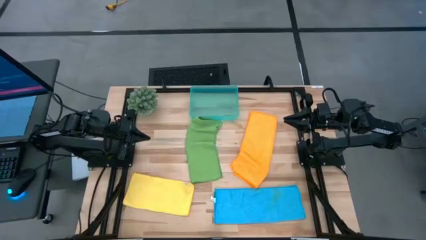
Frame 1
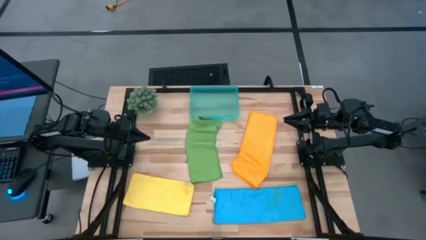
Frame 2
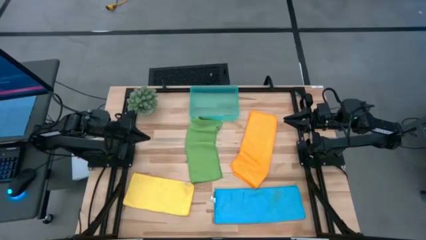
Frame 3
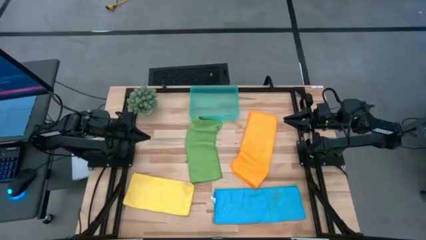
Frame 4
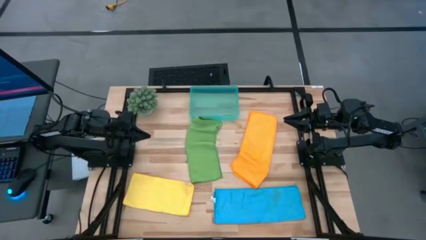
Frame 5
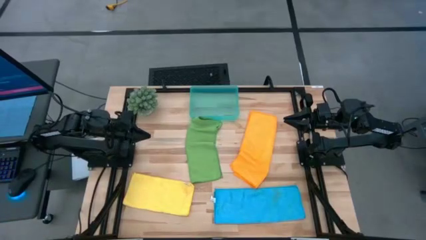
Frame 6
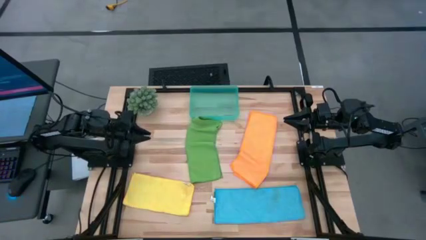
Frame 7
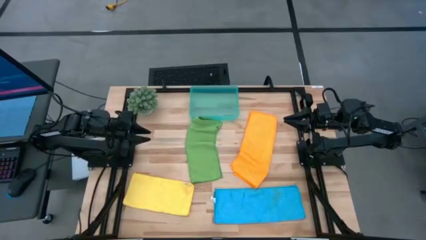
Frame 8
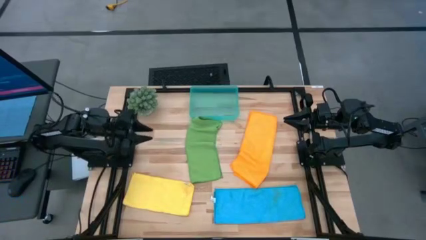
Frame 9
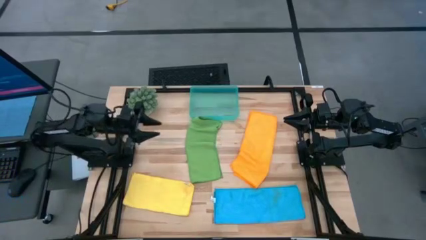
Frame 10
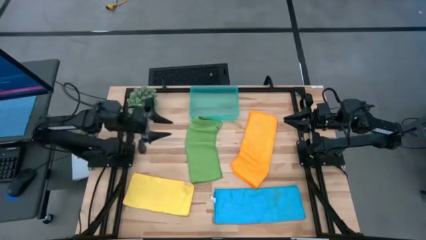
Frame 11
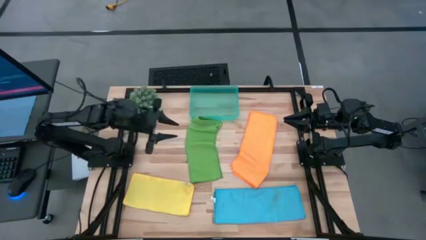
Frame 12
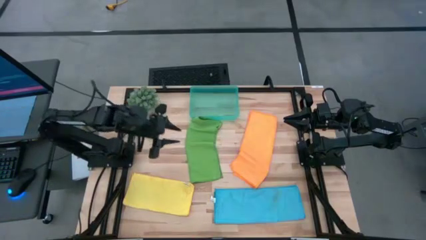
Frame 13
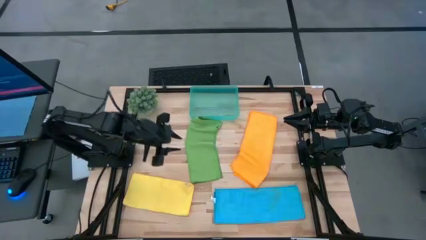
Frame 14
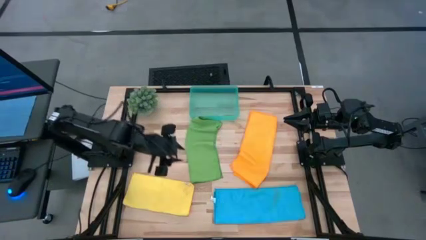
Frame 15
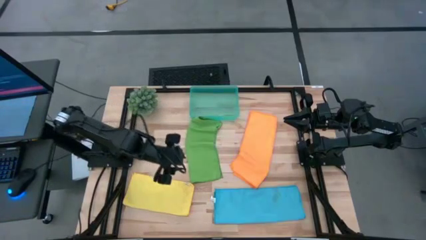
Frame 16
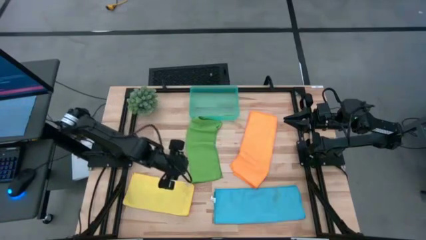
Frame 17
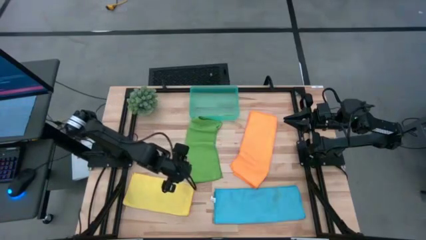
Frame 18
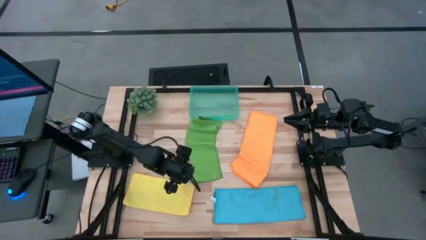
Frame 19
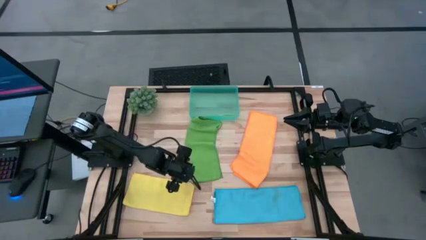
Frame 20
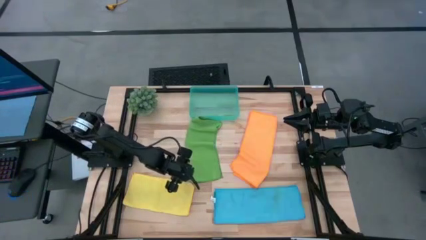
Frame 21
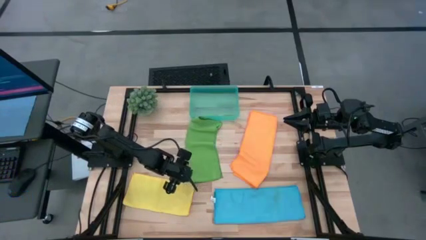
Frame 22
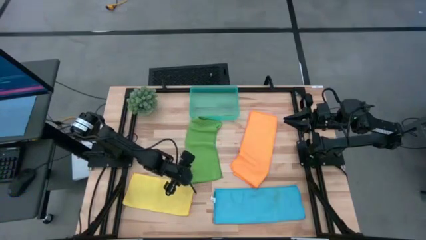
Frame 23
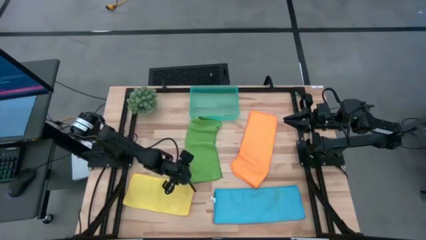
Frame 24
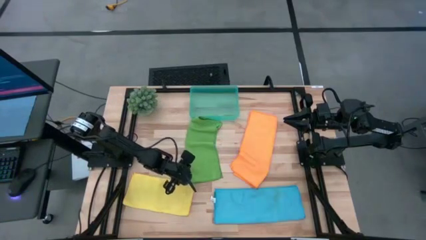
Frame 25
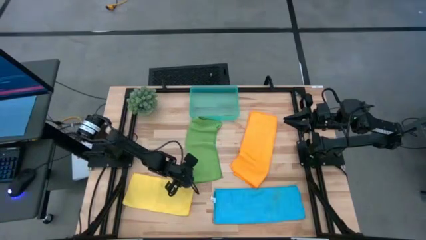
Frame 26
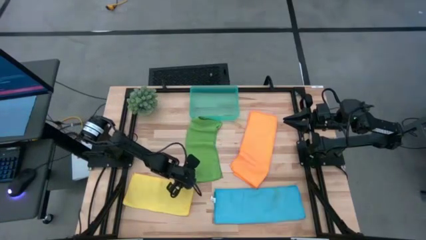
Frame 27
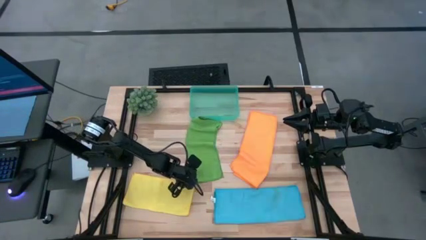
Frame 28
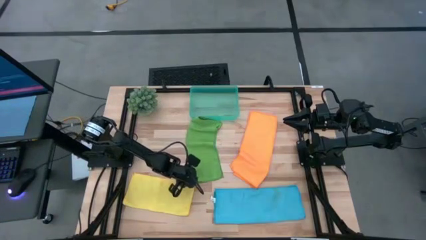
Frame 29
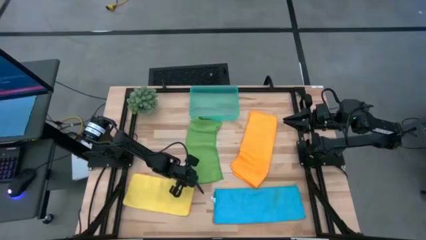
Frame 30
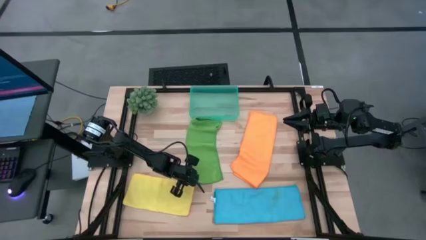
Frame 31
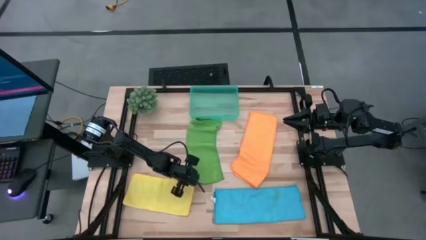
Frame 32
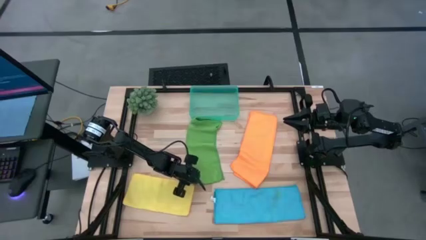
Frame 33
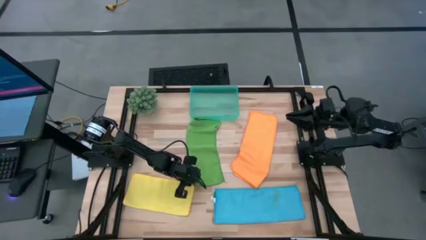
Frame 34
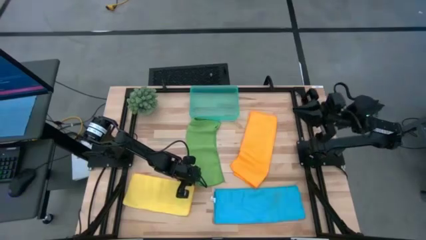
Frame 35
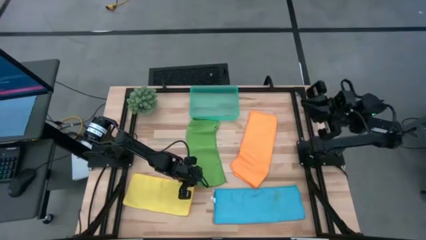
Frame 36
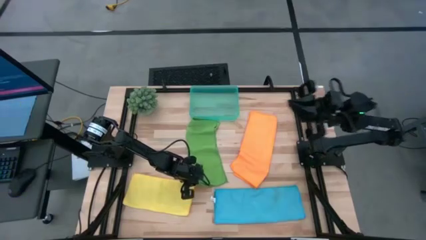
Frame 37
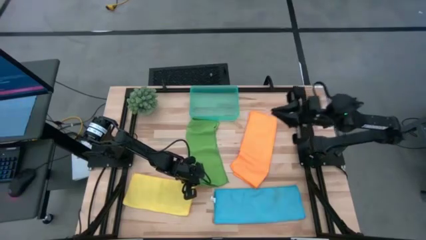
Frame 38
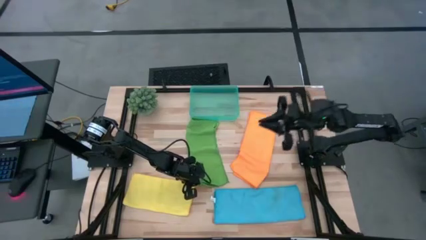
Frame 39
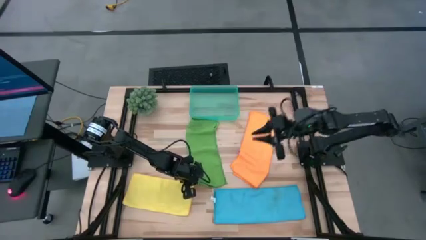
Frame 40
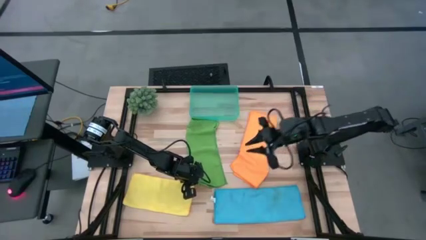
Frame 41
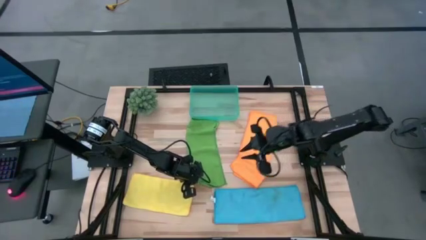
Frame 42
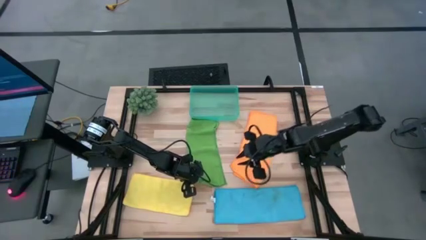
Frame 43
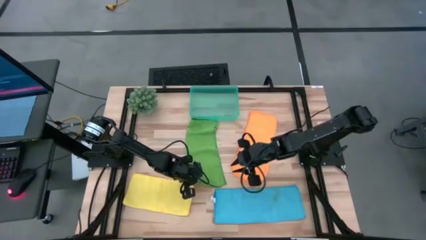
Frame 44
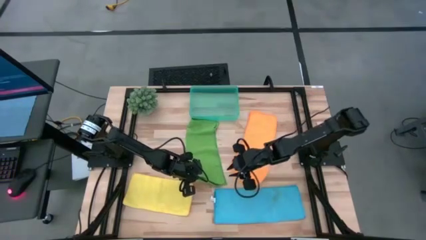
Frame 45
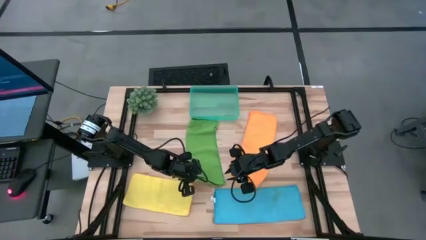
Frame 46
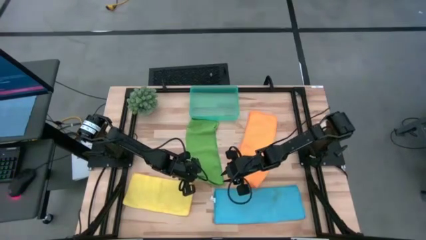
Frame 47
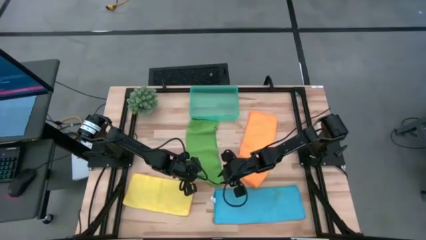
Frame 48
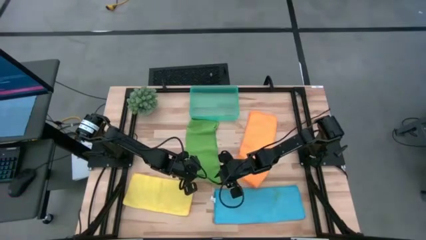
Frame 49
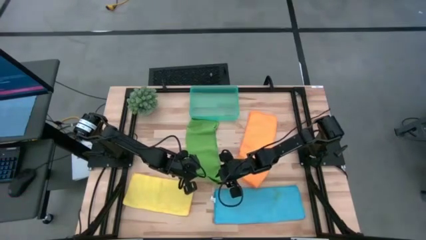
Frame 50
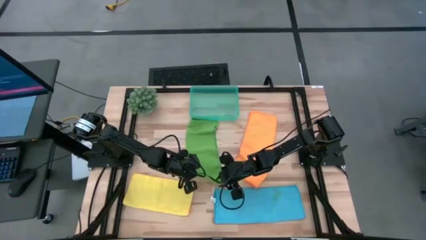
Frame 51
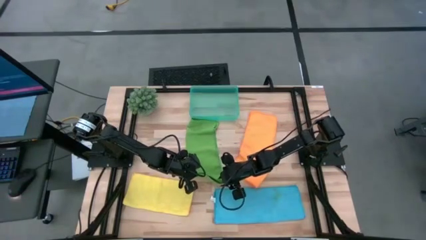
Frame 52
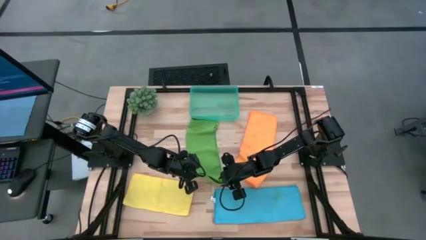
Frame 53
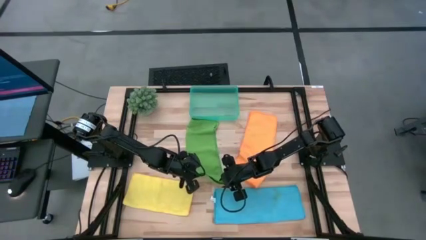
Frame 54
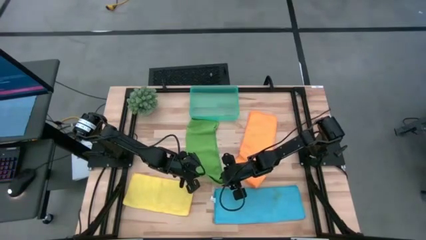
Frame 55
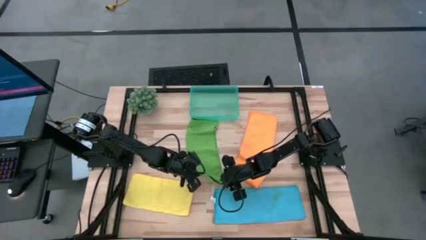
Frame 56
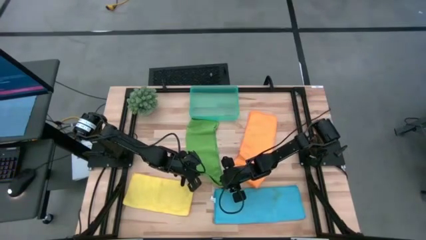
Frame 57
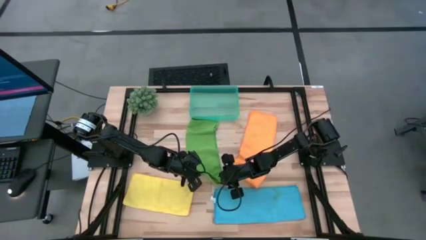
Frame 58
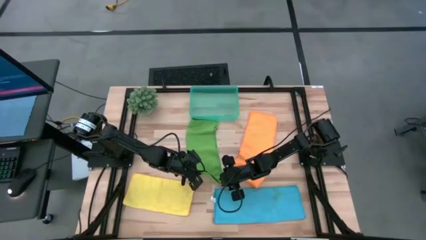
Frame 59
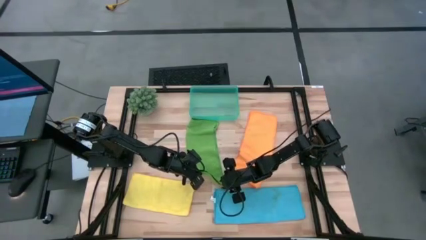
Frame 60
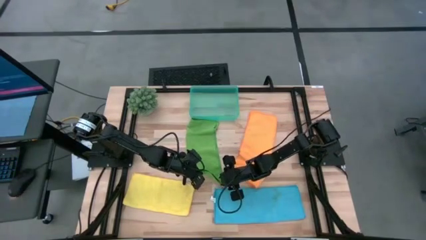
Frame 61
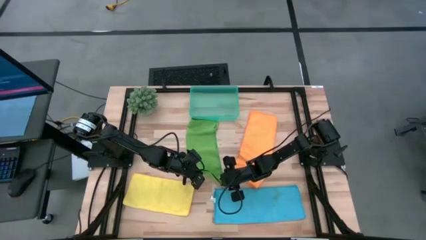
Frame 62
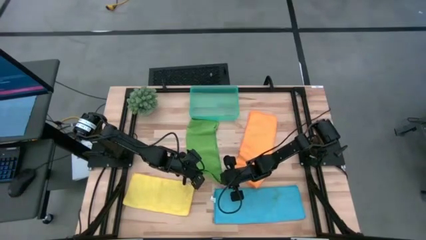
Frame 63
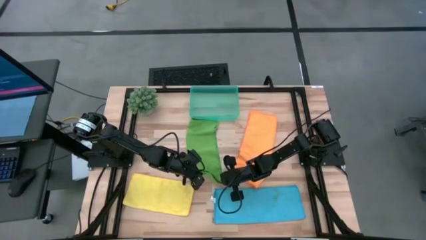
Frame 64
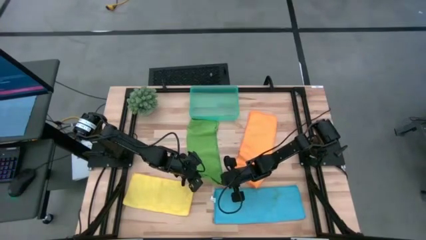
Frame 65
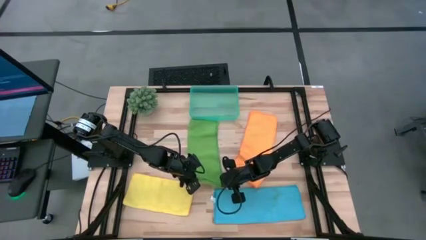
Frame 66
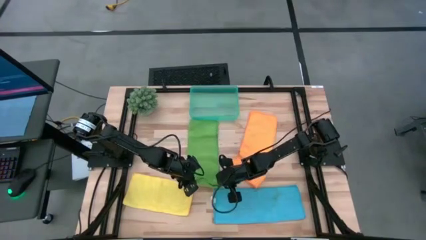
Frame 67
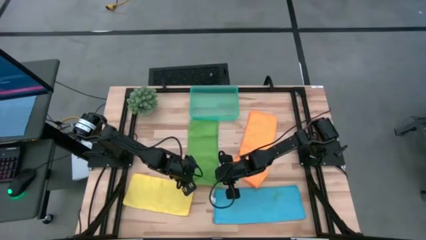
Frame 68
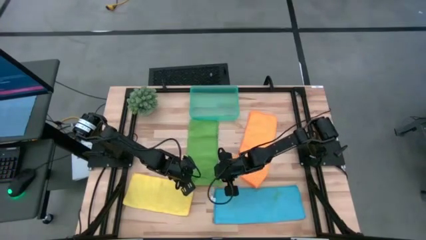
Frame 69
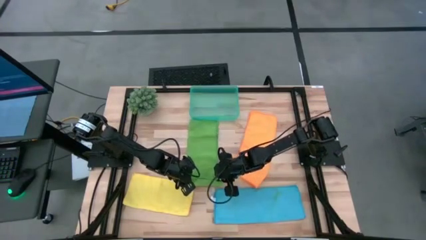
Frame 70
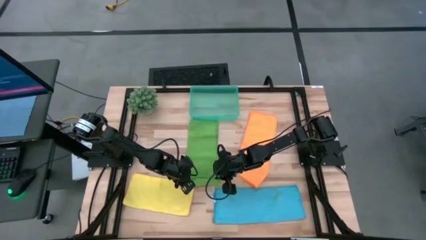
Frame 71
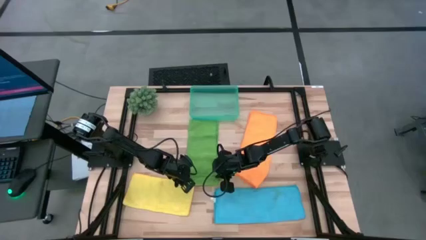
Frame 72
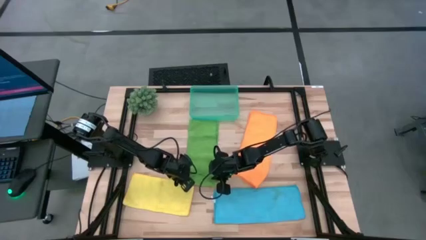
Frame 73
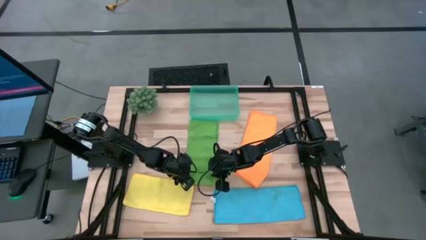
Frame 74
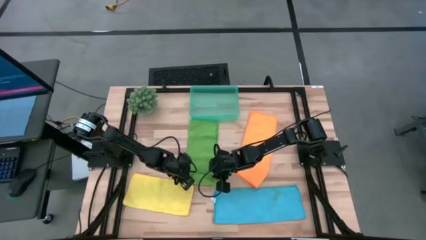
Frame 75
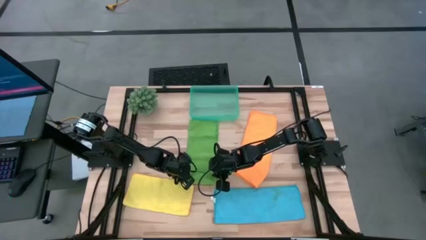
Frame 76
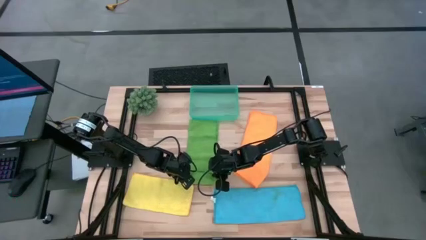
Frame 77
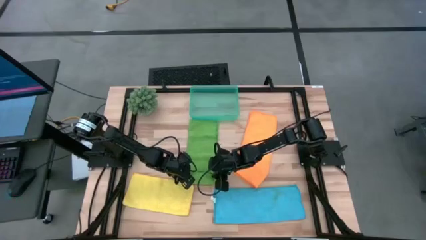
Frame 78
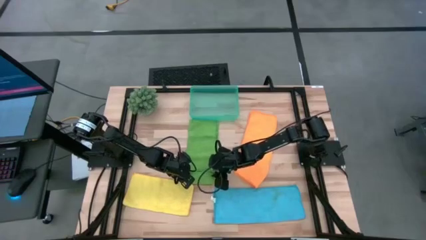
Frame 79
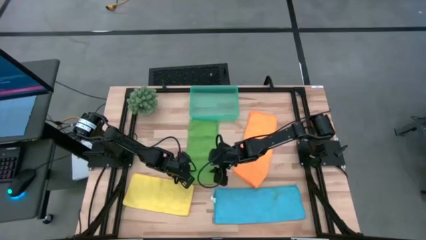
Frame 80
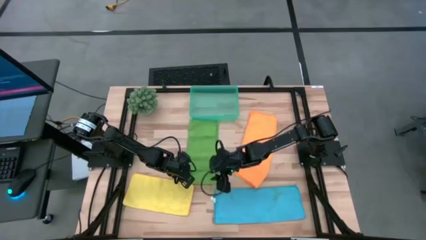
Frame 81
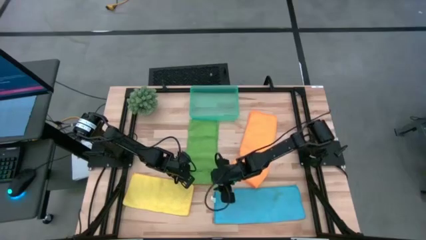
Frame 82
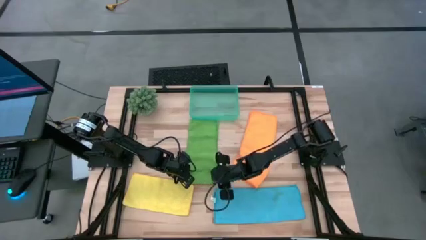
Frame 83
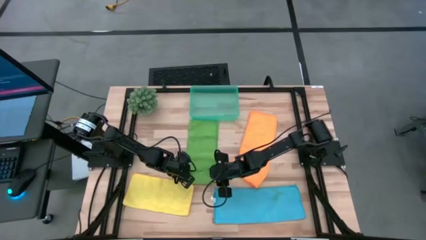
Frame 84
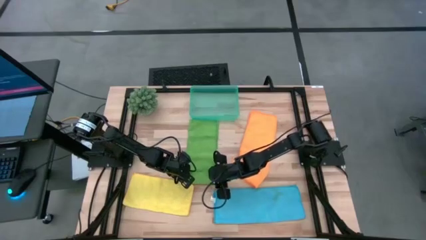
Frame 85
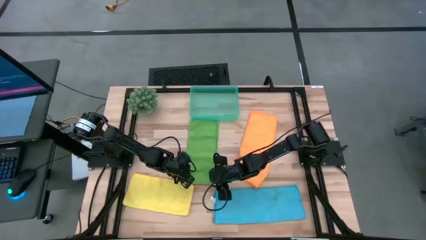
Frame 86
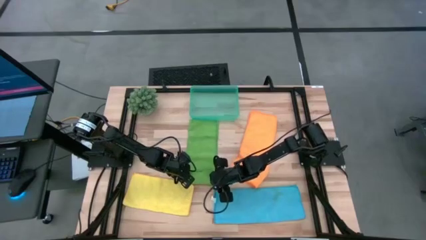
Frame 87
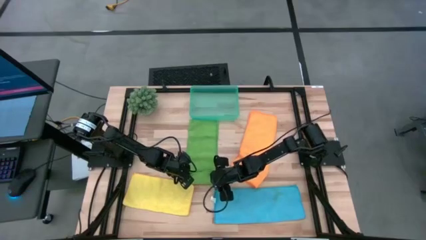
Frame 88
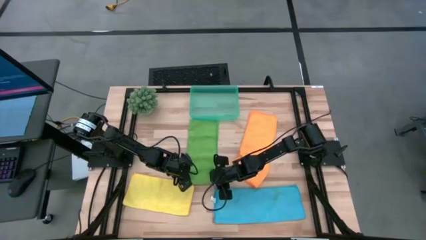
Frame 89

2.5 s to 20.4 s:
Task: Roll microfiber towels into tight, uniform cylinder then place into a basket
Roll the green towel
